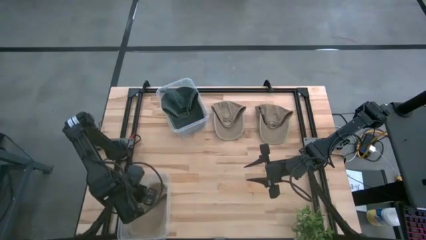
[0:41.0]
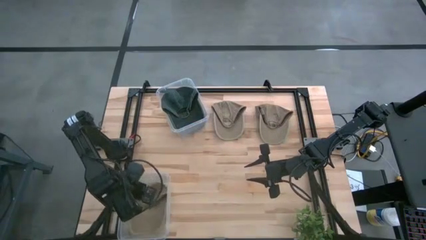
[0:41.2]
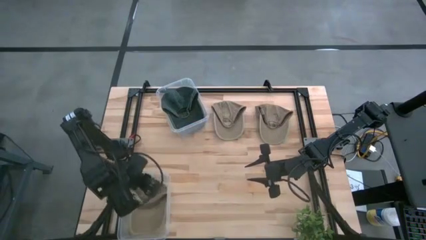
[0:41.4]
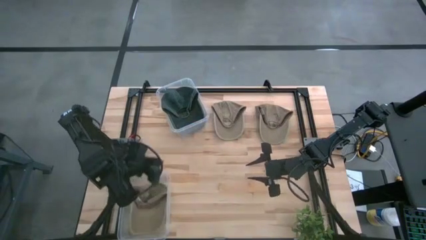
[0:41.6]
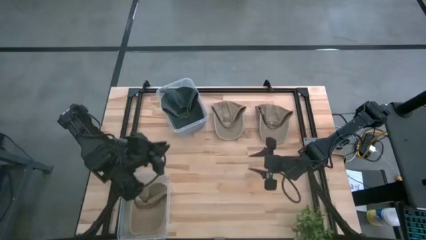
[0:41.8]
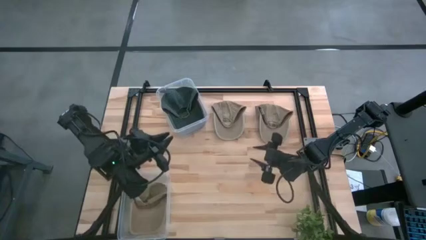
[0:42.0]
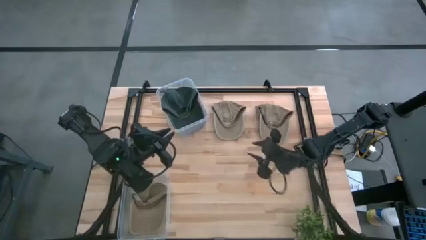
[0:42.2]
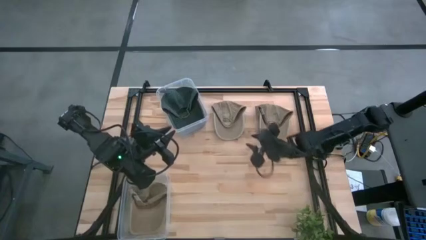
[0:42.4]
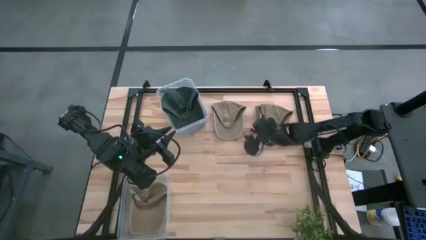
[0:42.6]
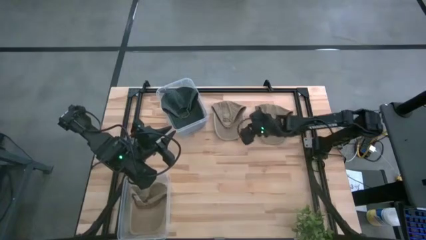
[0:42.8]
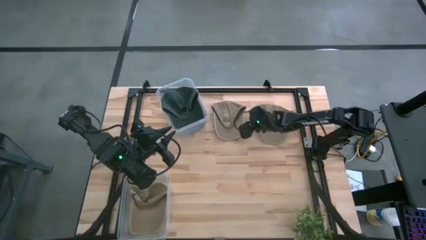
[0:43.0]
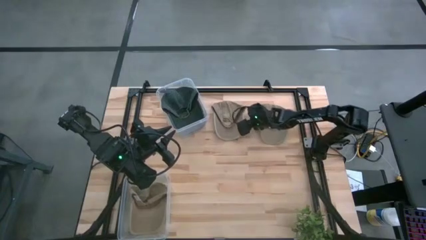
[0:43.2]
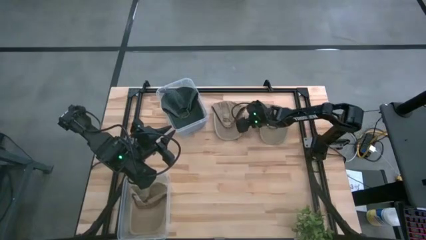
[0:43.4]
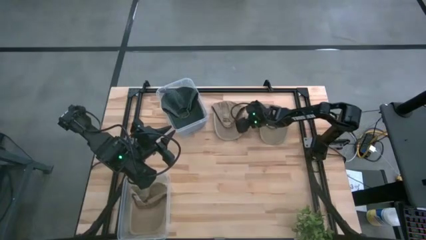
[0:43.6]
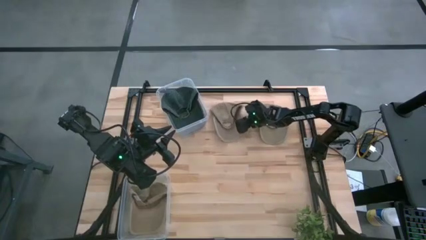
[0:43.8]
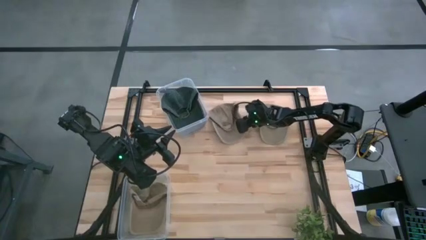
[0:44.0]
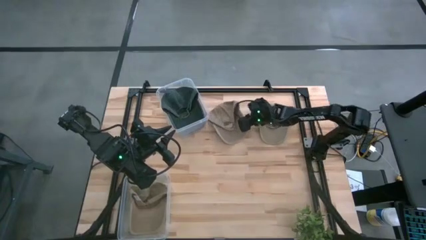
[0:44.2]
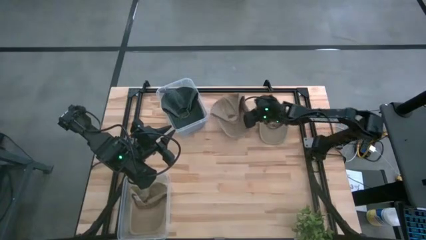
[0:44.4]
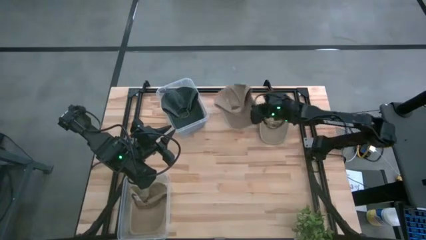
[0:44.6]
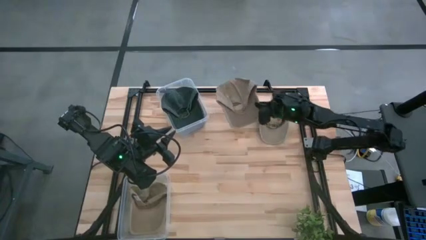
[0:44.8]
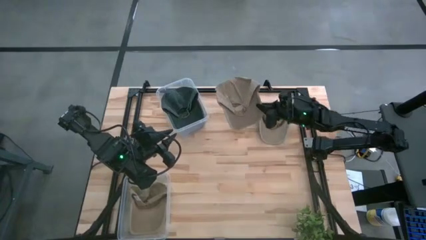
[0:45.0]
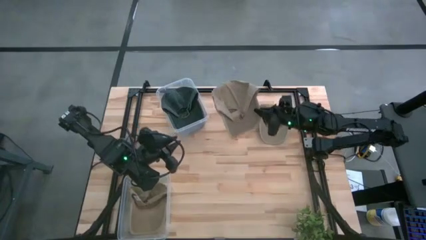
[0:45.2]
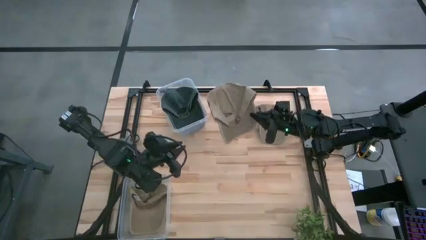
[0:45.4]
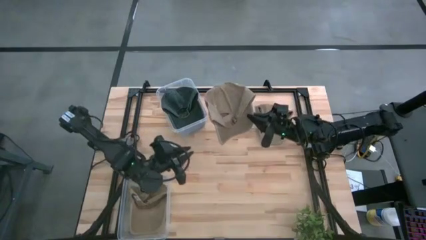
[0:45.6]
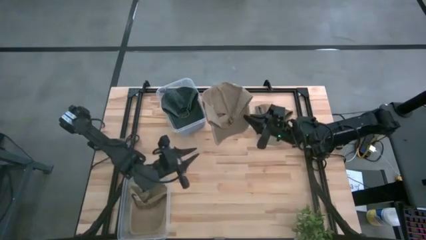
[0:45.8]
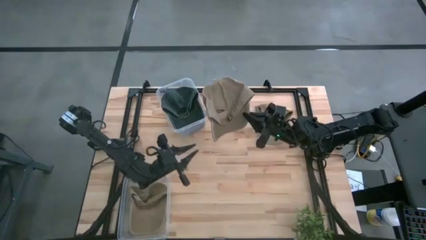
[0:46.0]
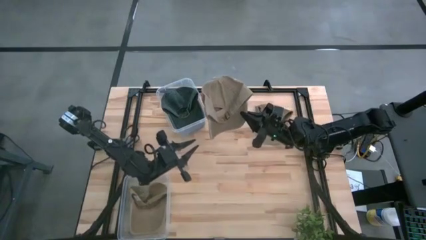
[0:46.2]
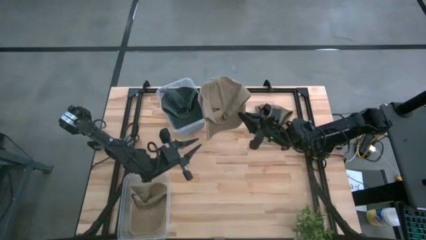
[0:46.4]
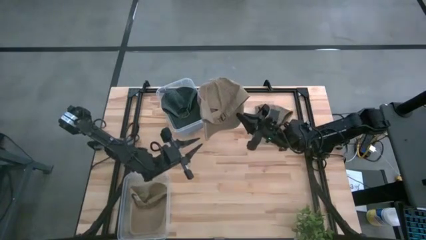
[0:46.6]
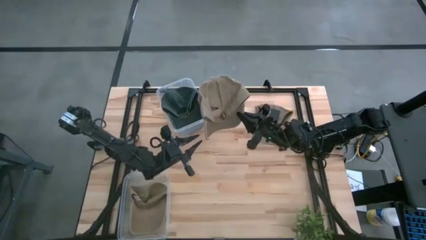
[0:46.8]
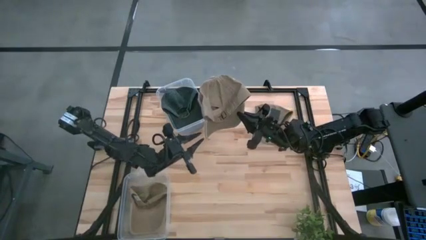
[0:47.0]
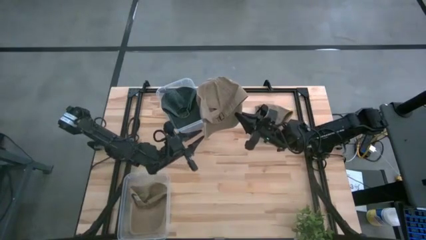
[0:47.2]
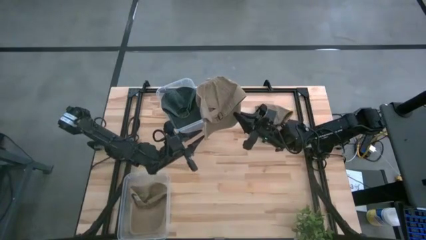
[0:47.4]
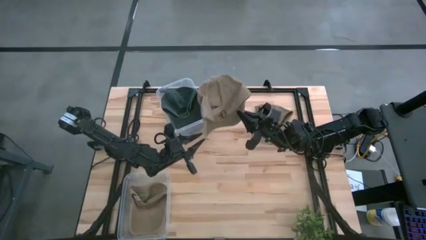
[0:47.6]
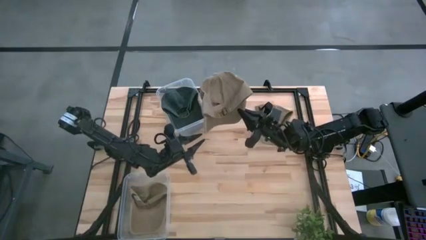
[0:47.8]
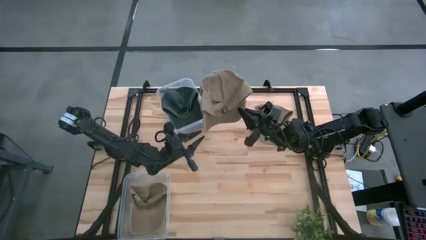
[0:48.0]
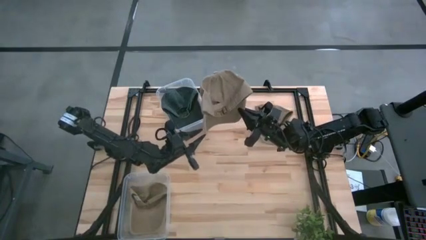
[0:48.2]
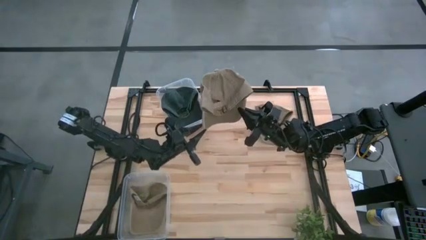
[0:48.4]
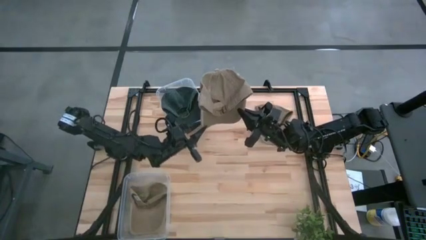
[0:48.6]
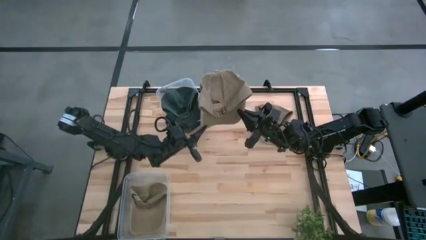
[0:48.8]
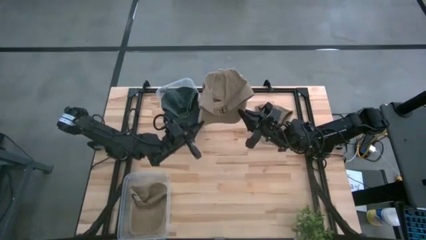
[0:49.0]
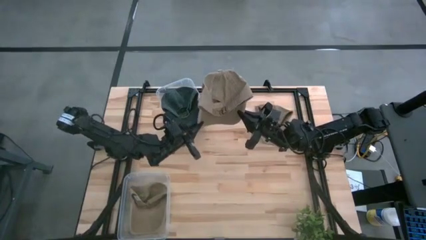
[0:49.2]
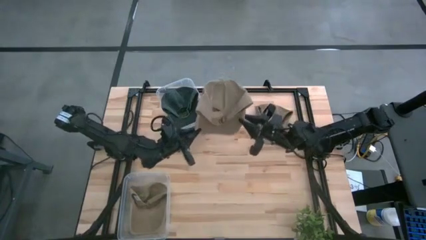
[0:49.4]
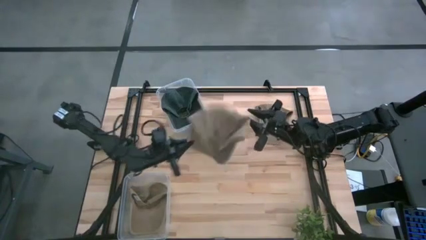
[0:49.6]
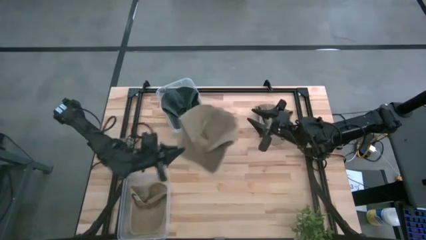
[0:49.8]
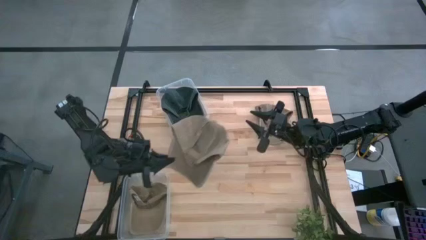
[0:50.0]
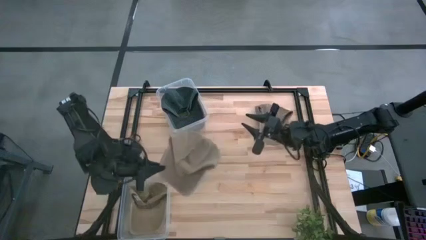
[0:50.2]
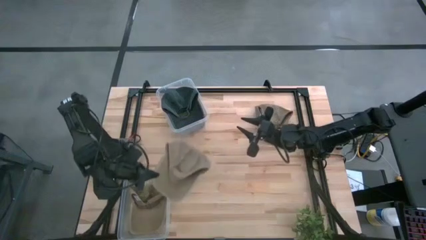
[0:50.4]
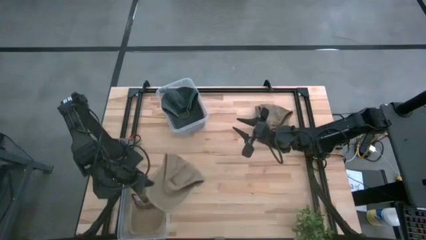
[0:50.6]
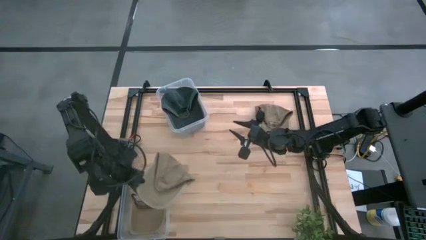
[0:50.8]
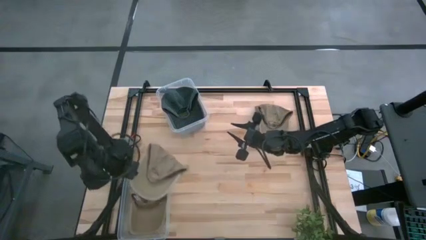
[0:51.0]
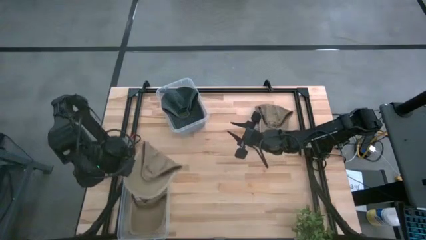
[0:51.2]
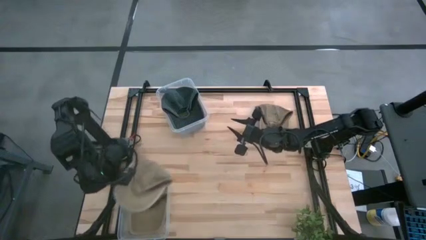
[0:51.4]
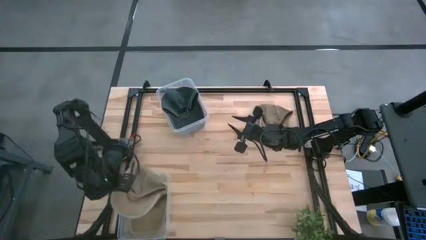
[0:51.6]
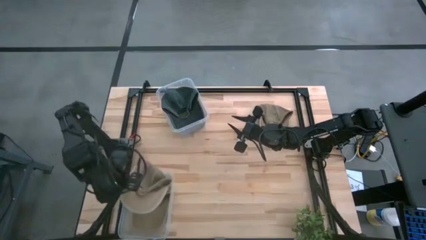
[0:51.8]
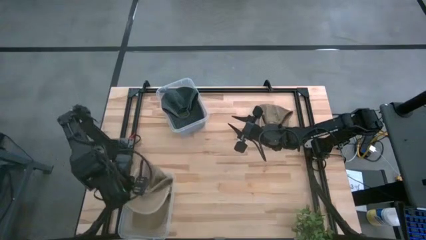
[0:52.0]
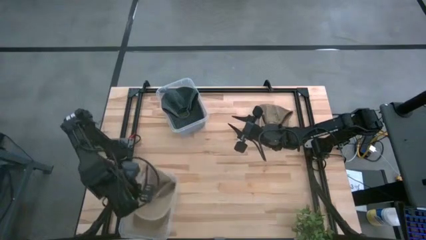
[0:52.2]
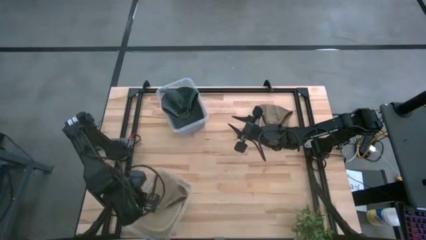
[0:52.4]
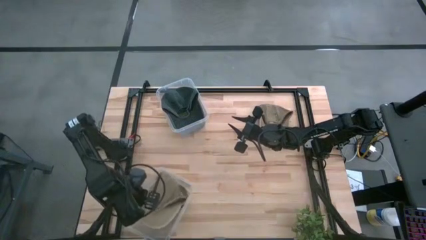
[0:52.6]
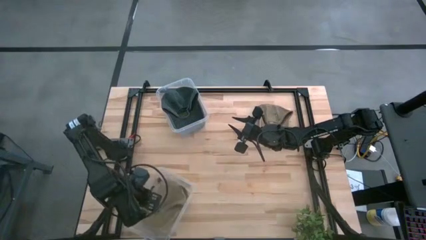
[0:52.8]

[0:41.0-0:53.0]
Task: Pick & Place hat
Put the left brown cap into the bottom transparent bin

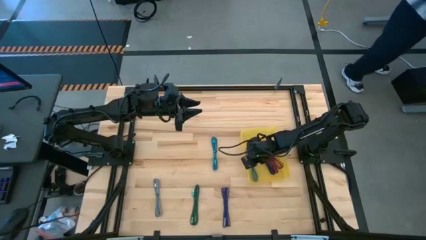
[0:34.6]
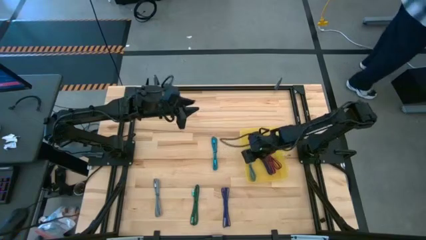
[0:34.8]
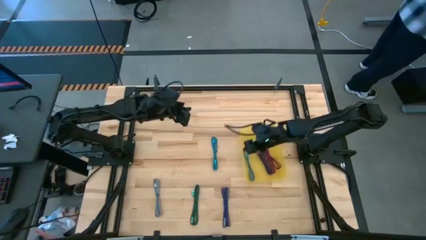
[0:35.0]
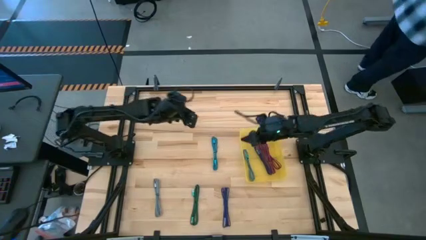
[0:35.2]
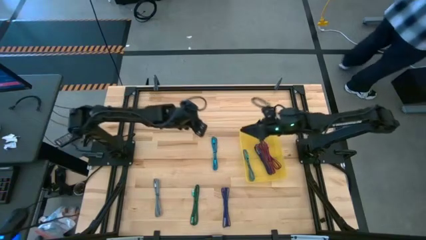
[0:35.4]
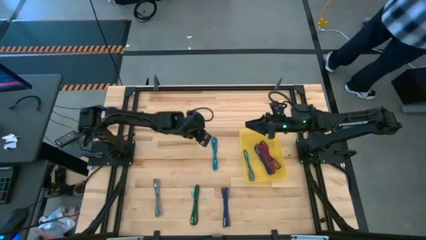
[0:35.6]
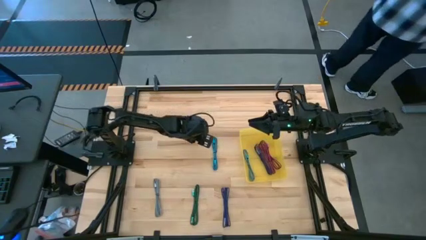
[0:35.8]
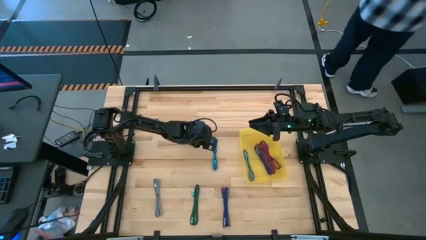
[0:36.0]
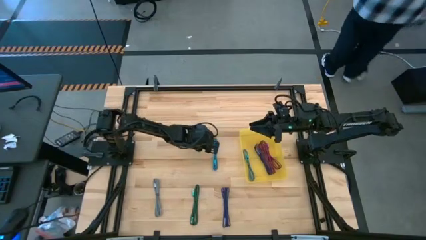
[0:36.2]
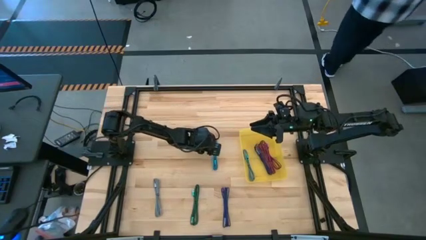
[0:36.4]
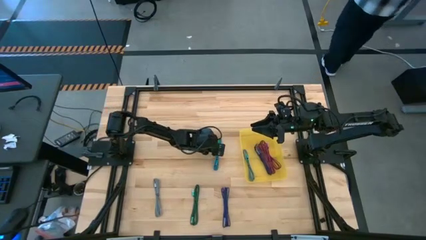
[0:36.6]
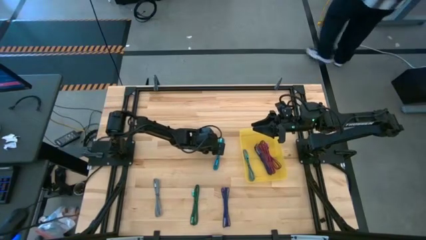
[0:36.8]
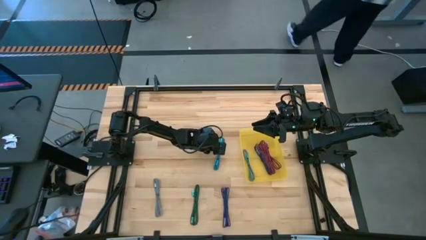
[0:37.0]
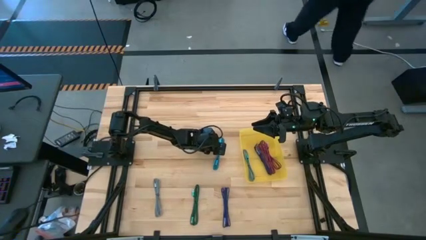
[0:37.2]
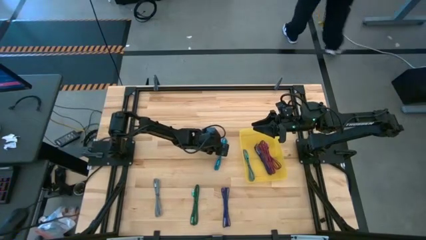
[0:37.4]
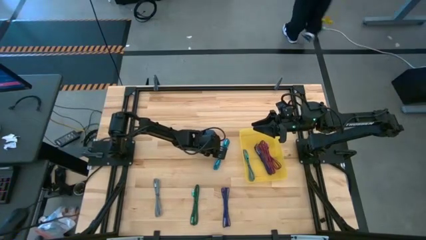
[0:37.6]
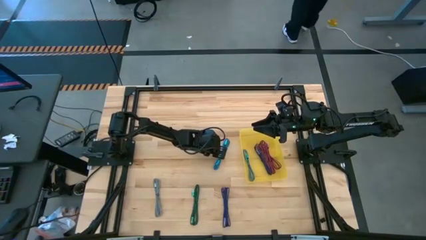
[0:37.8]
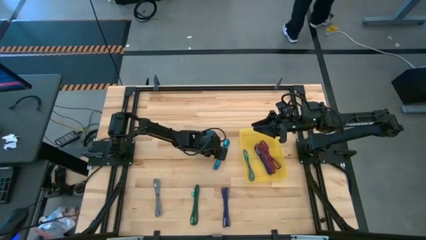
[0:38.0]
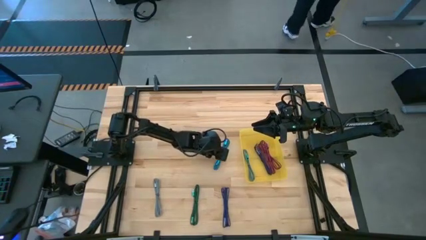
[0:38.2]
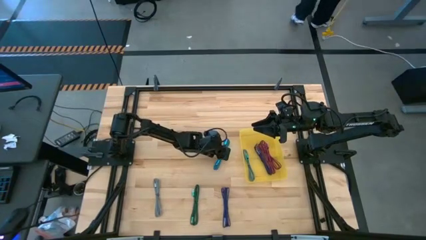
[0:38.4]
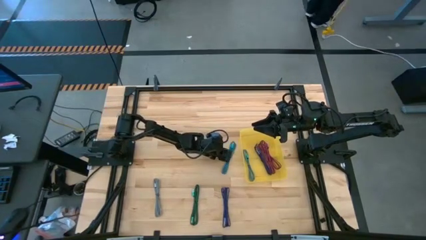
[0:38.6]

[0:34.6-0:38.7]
Task: Pick and place USB-C Cables
Put the blue charger cable into the yellow bin
